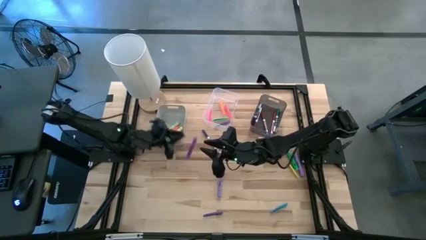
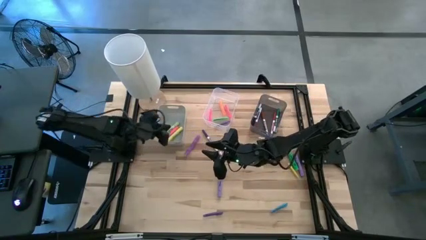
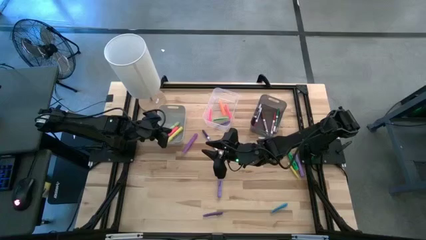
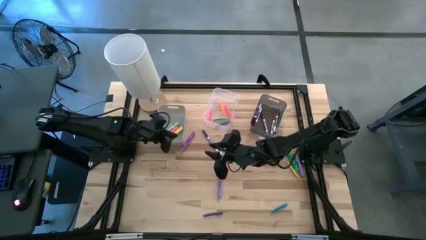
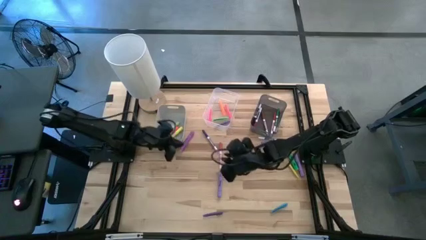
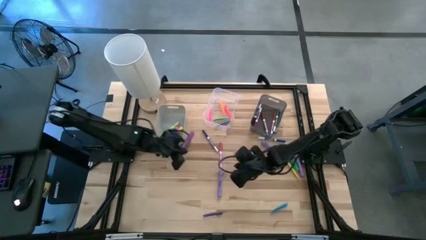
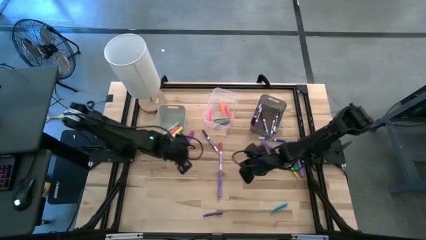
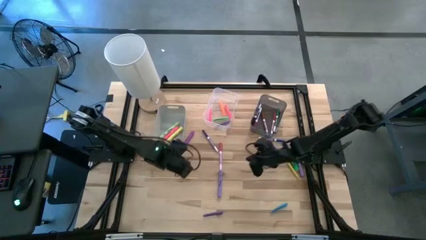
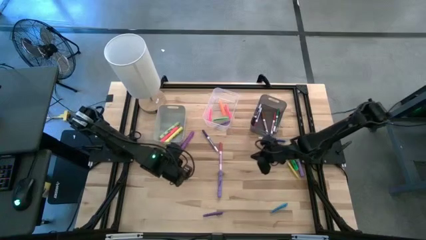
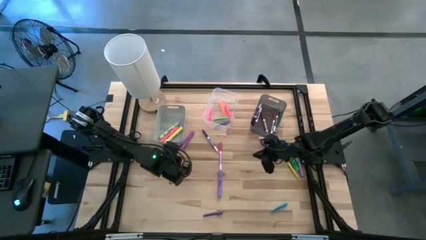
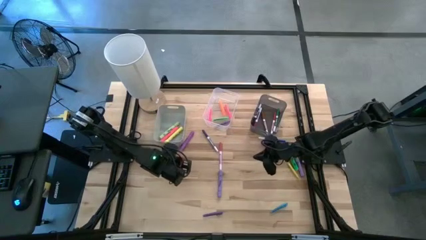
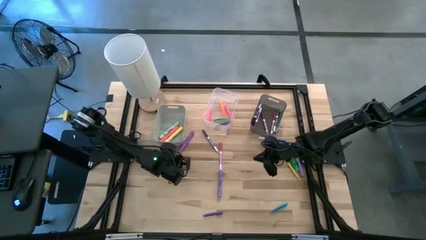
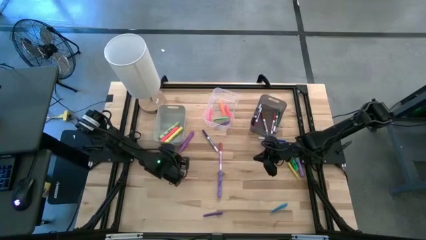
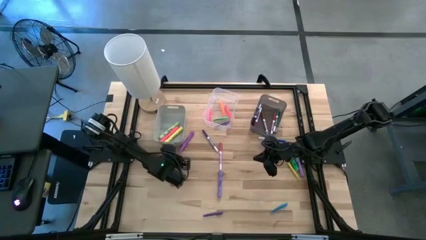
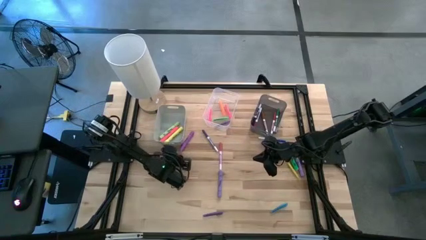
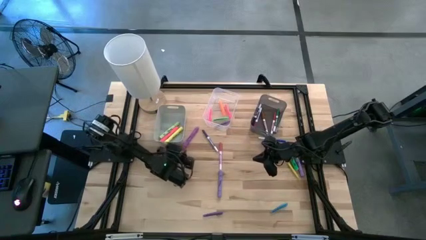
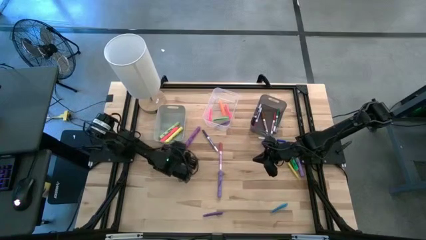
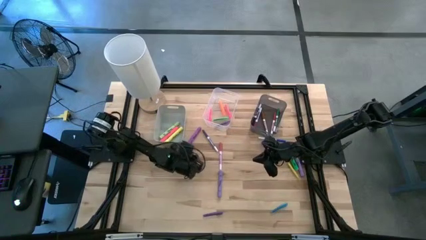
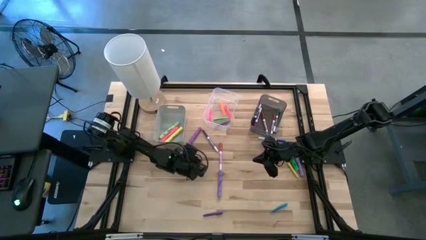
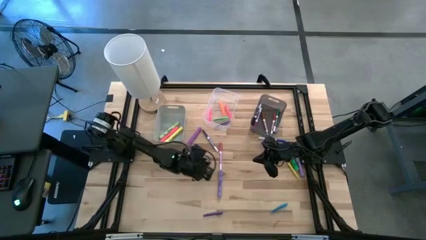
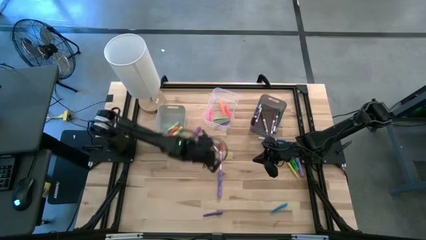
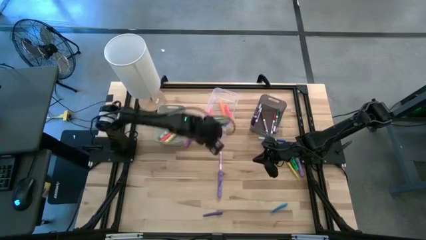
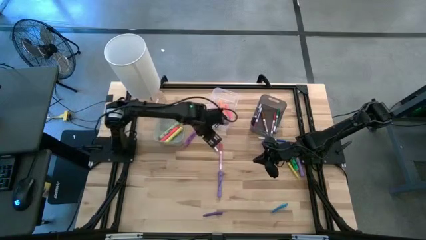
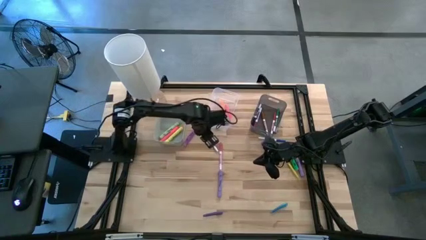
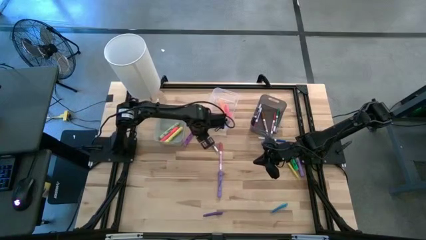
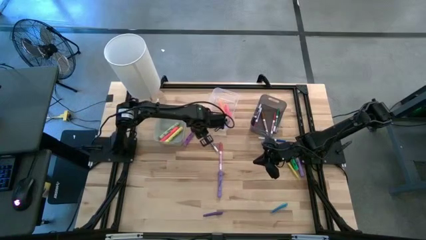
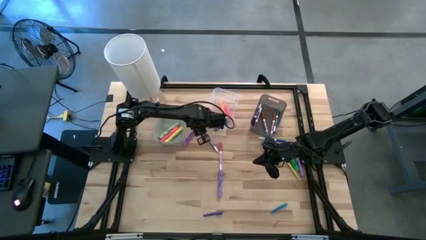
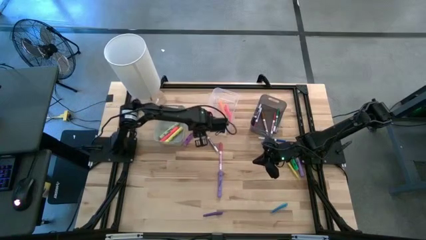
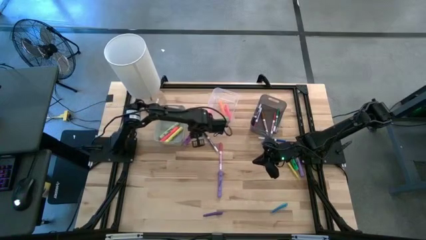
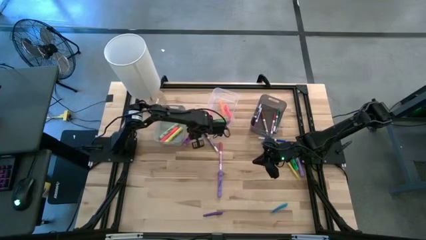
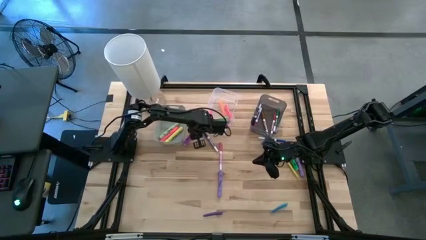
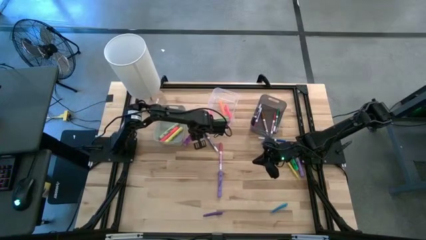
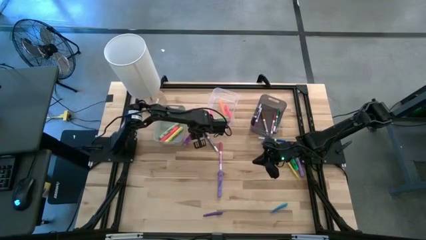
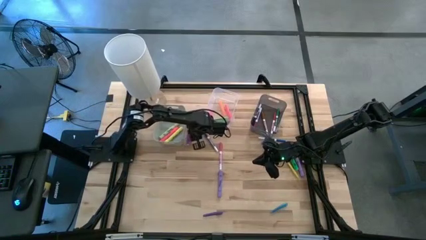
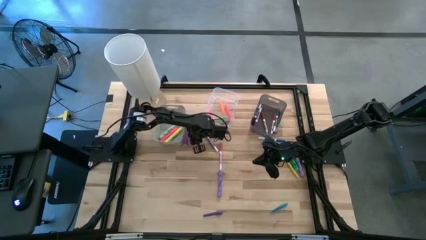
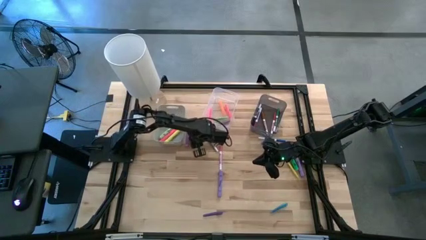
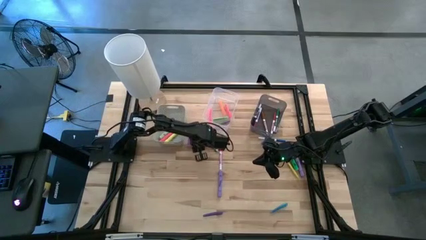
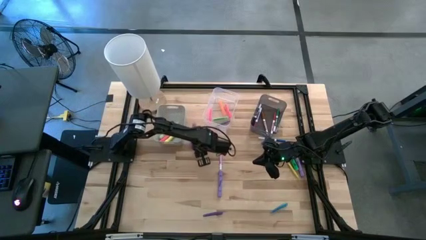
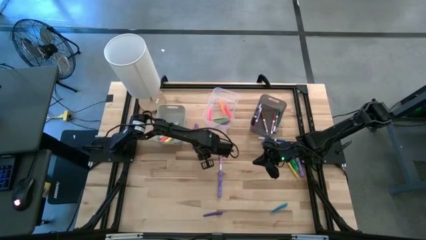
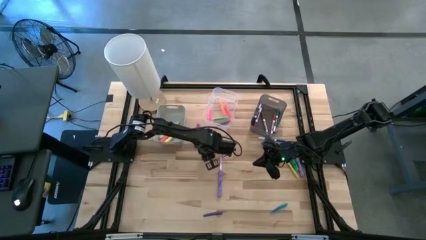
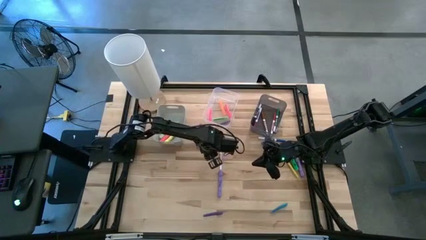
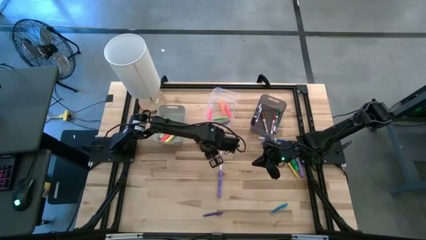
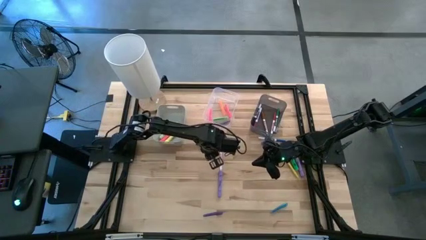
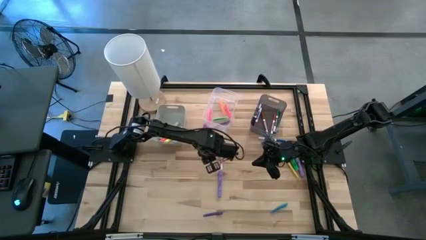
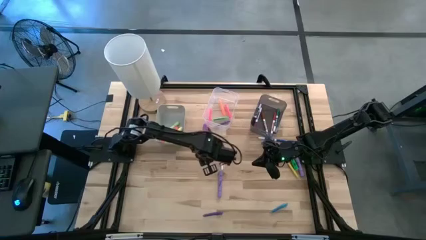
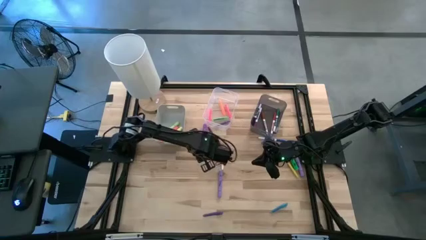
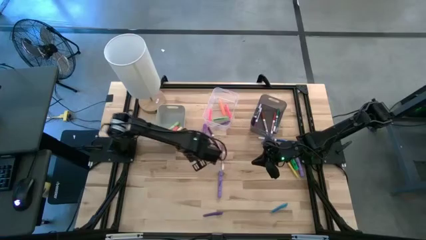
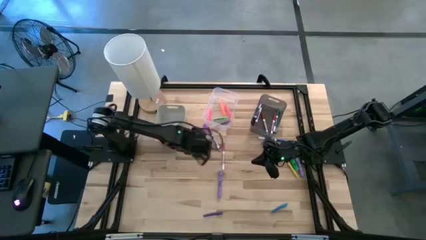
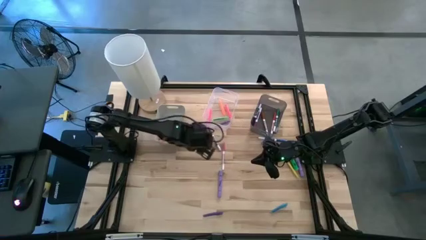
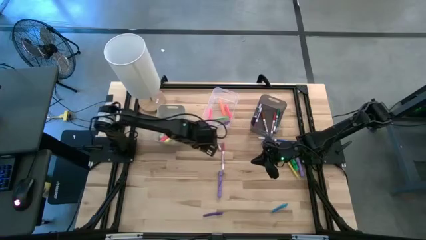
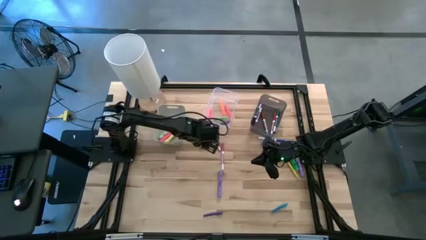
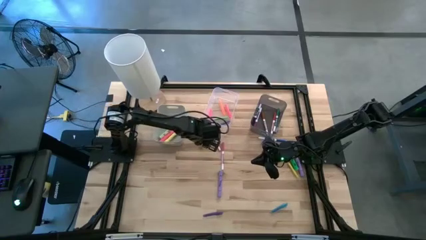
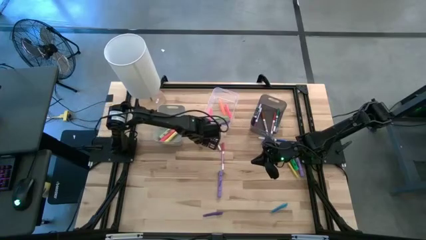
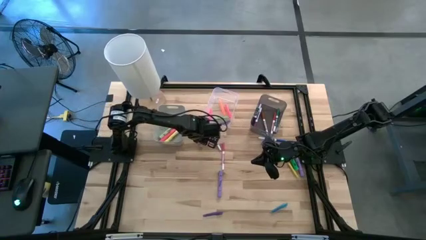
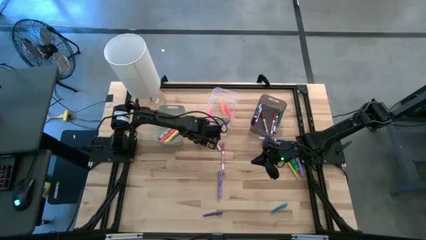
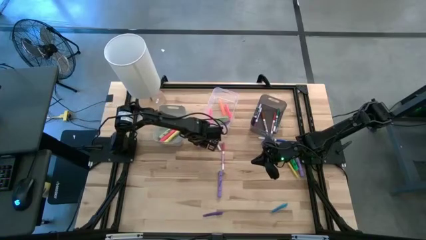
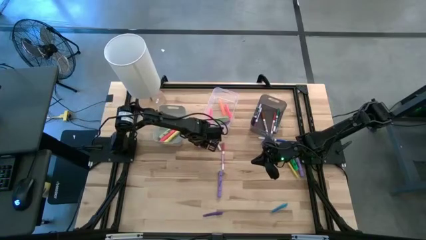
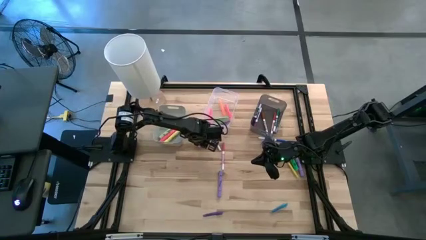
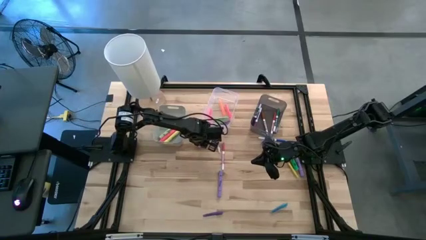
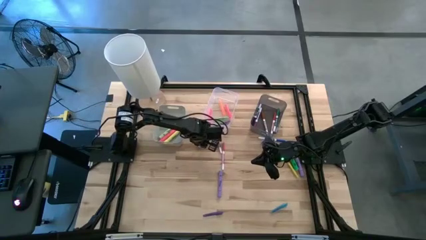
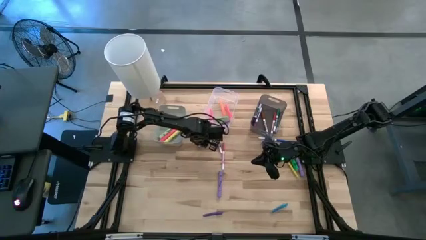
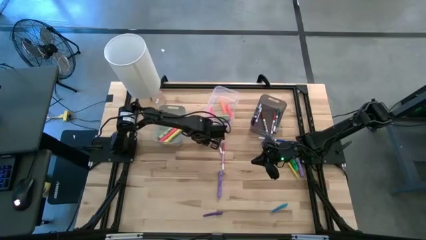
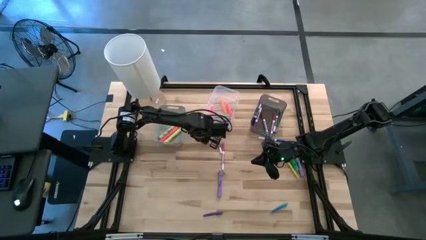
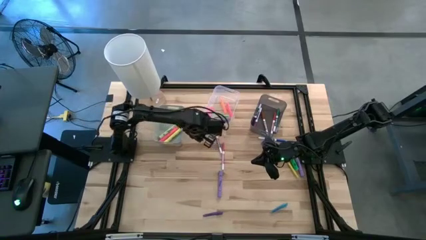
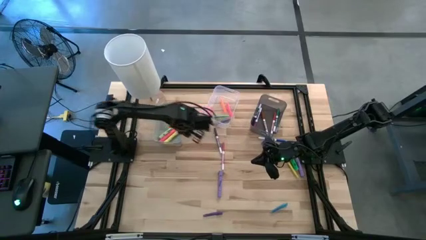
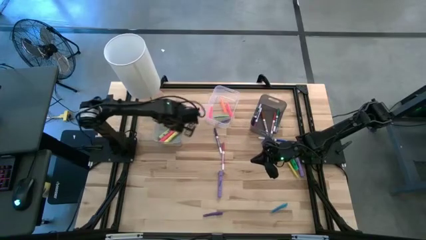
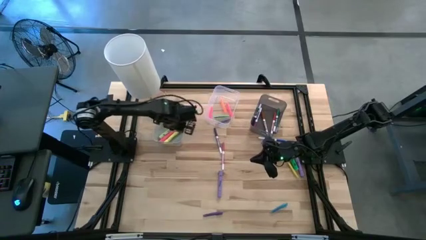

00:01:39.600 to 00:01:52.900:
Task: Pick & Place Markers
Put the violet highlighter into the gray bin

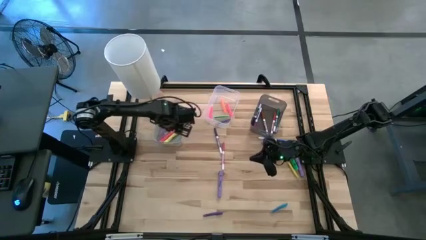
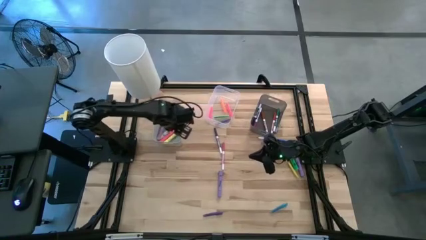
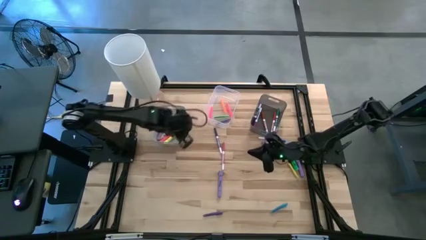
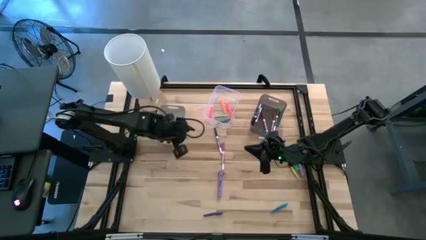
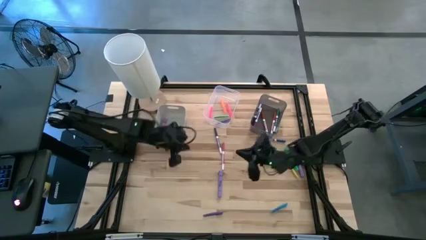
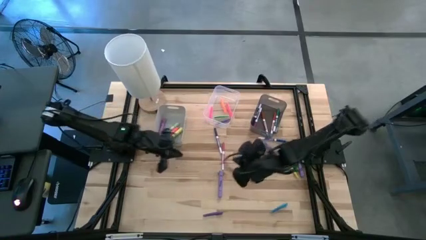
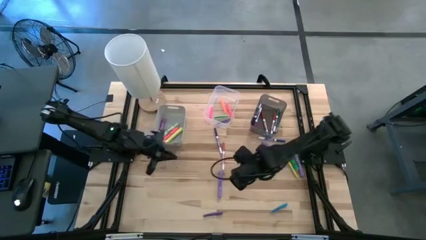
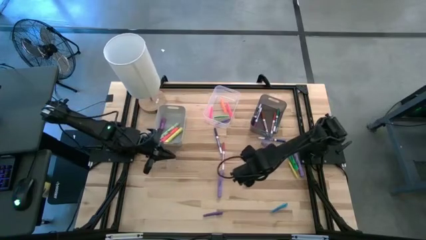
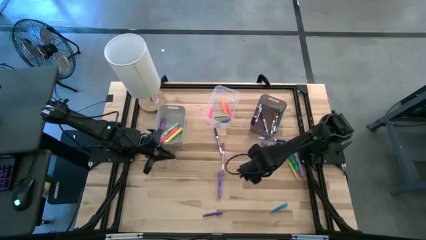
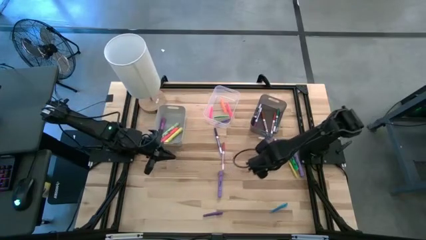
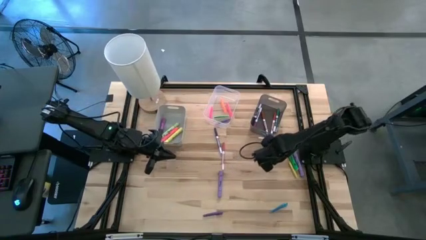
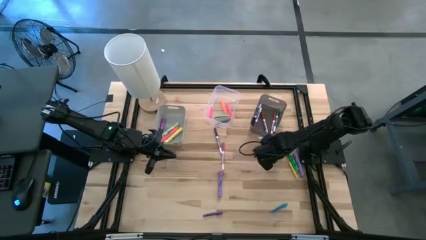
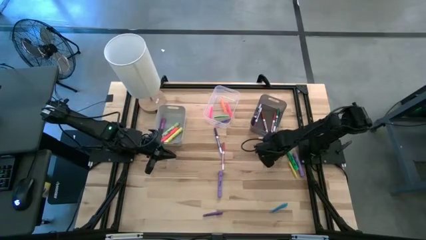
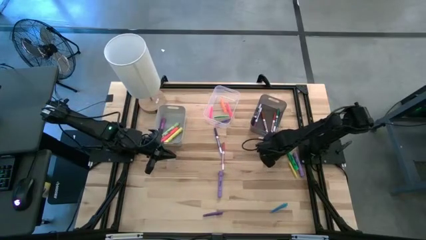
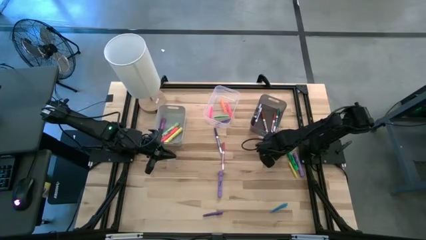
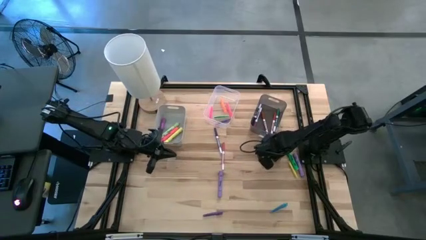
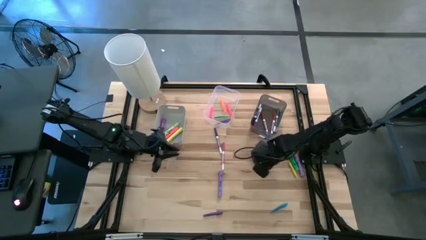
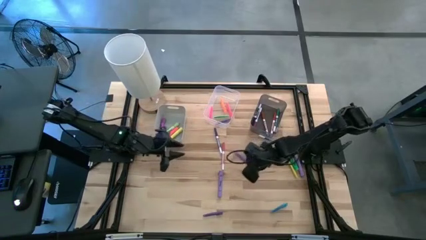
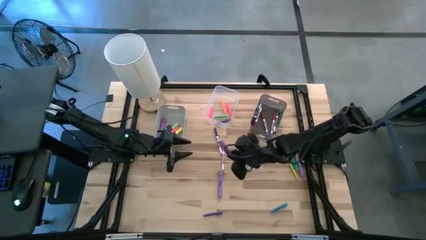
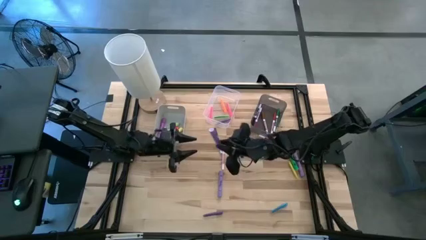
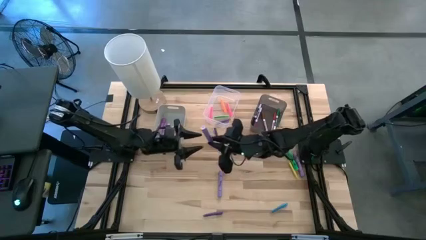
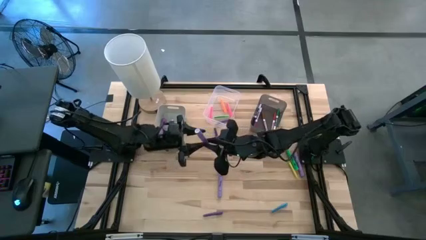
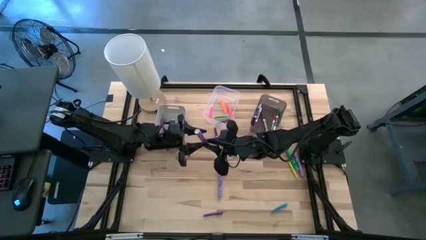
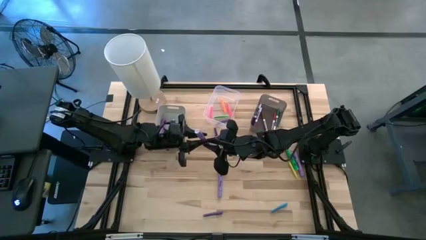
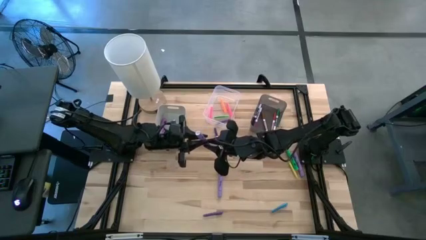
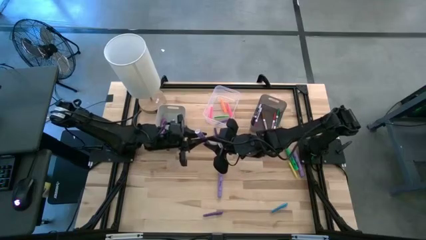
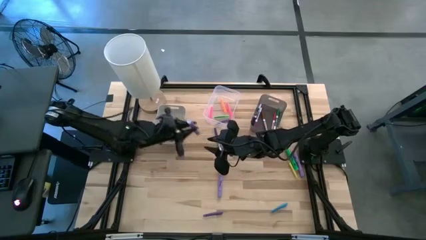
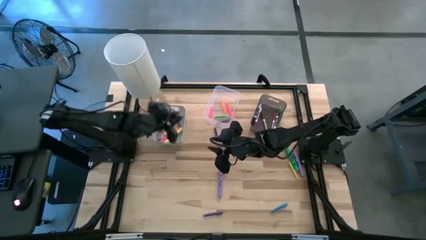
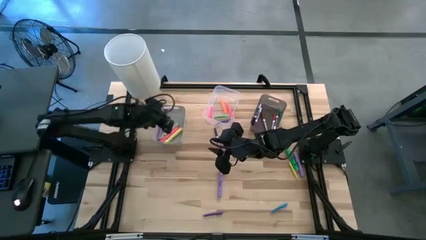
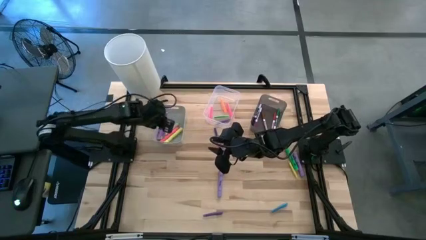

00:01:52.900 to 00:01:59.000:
Put the blue highlighter into the gray bin
